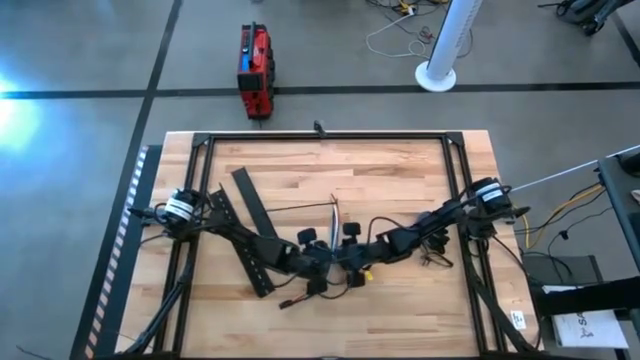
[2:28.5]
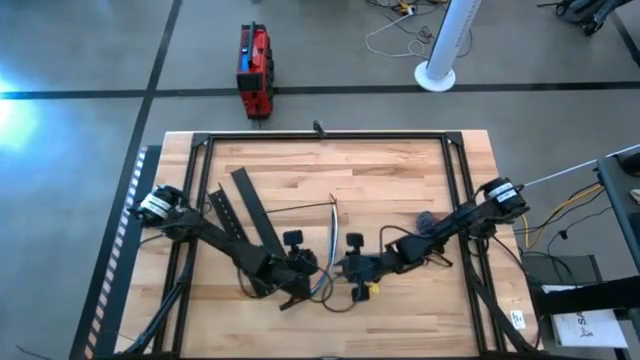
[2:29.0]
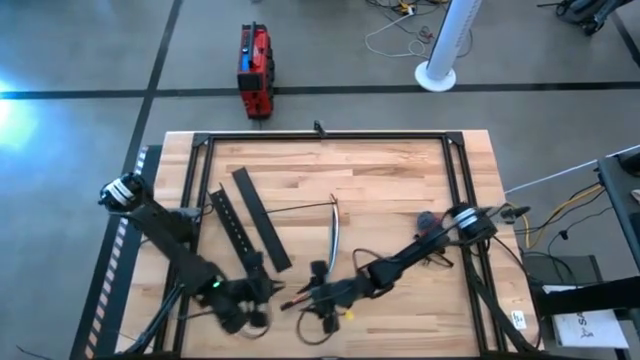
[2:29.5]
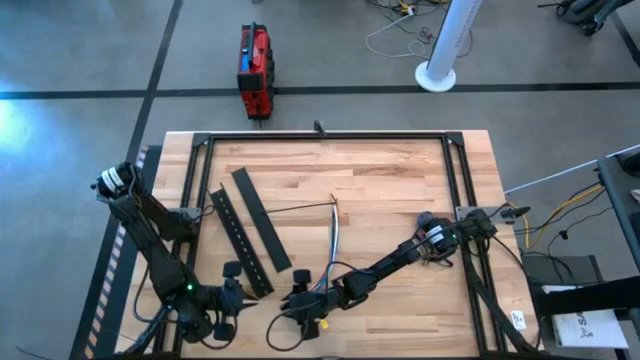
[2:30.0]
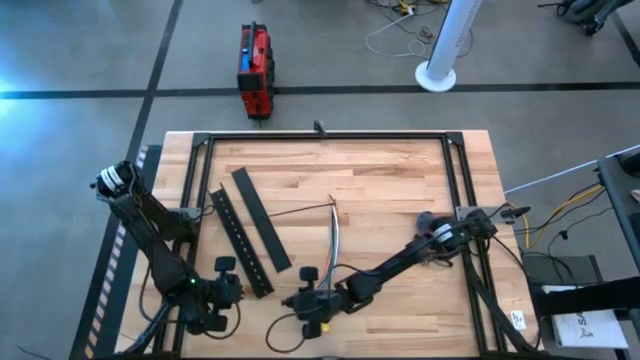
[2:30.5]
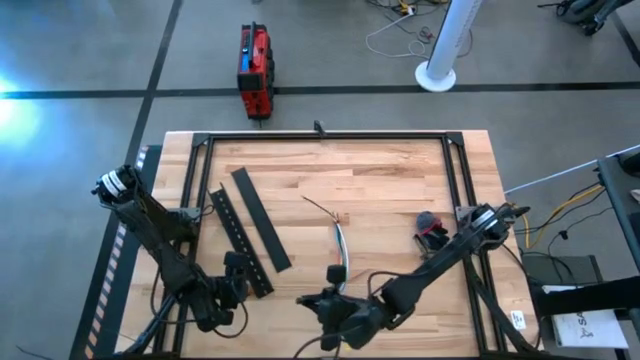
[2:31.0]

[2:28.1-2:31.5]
Task: Ziptie cables
Move the black cable duct to the center of the table

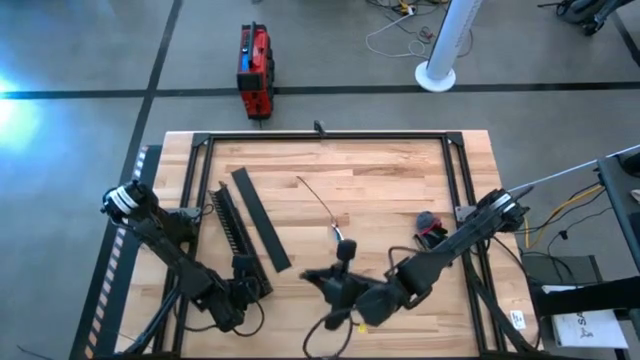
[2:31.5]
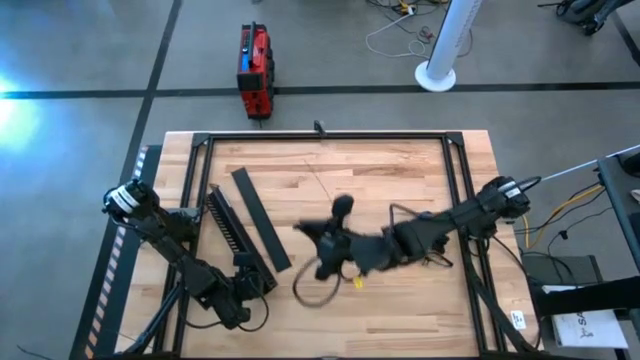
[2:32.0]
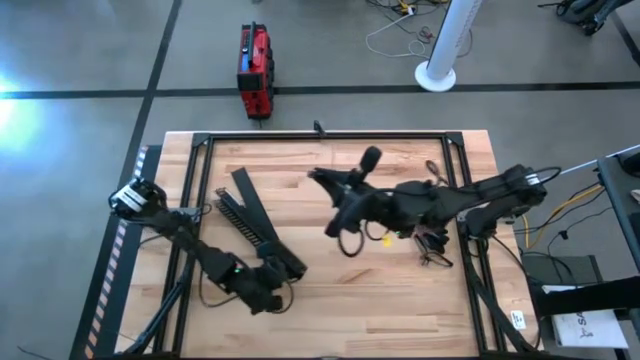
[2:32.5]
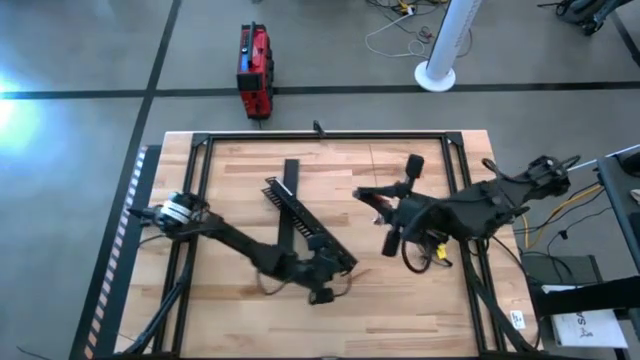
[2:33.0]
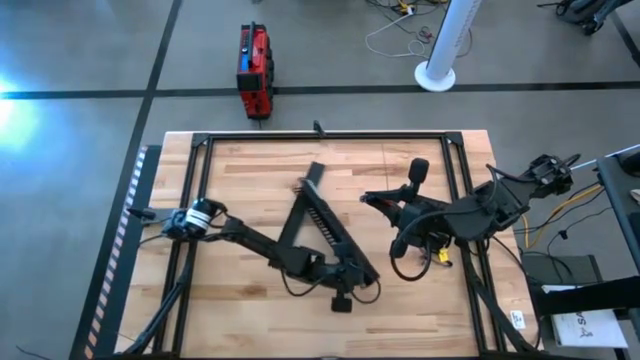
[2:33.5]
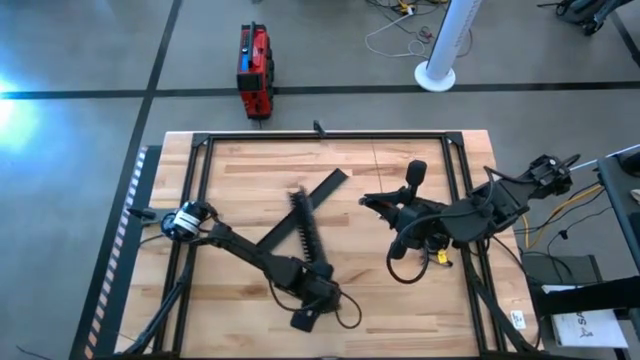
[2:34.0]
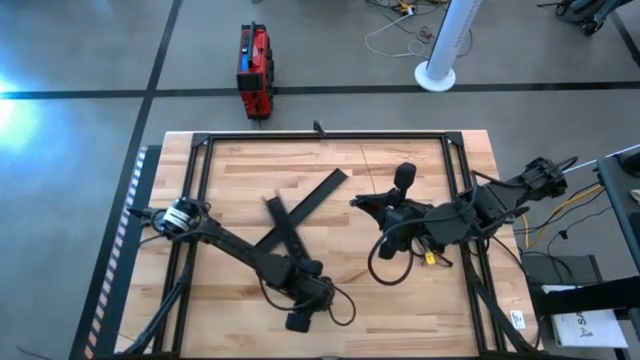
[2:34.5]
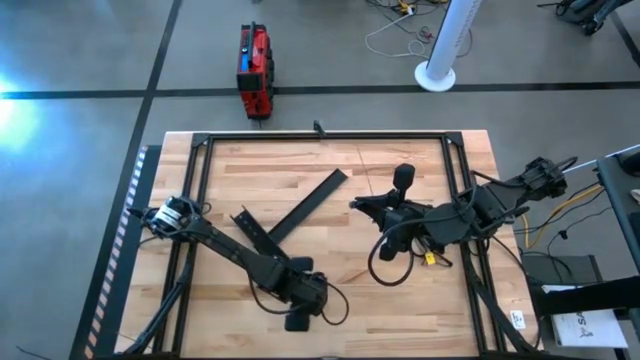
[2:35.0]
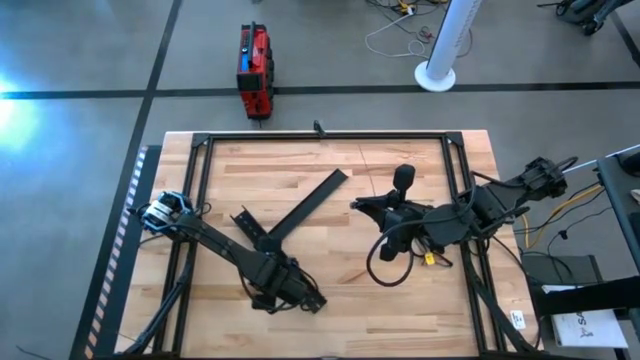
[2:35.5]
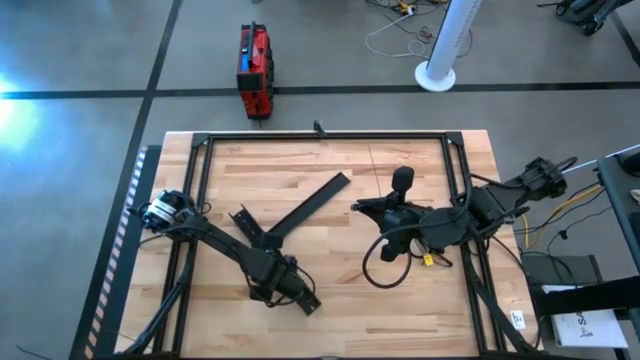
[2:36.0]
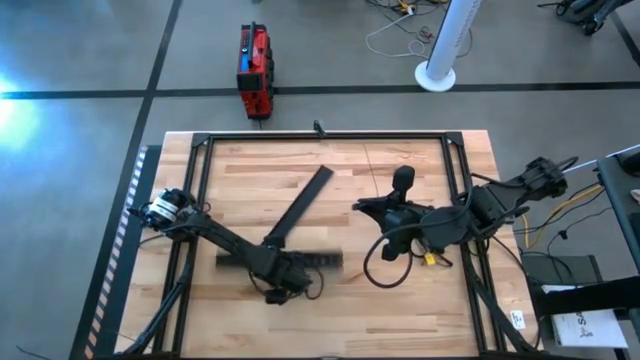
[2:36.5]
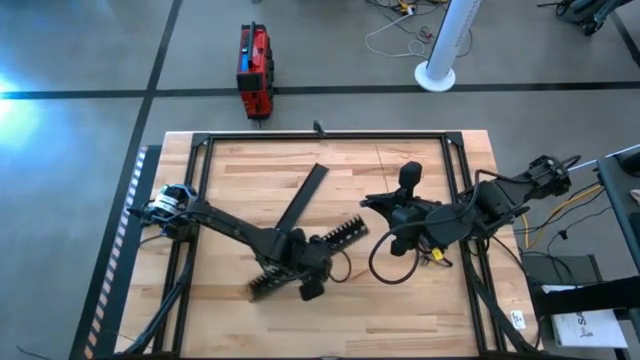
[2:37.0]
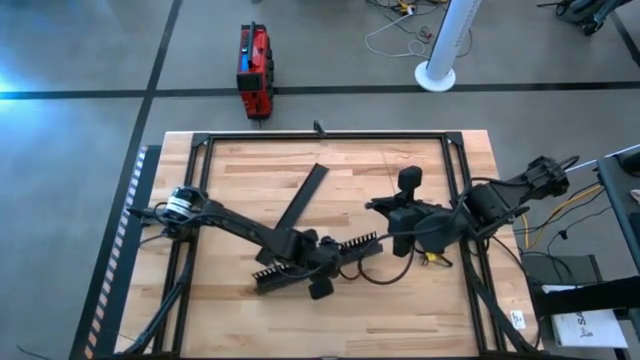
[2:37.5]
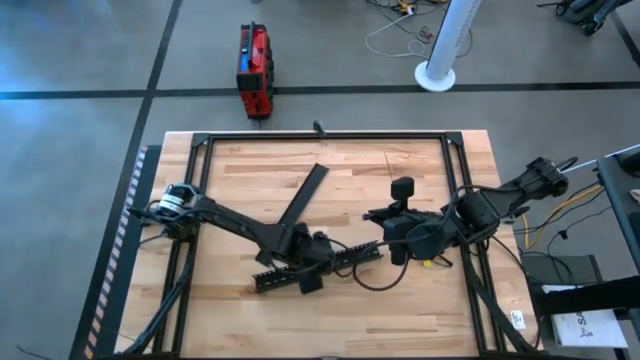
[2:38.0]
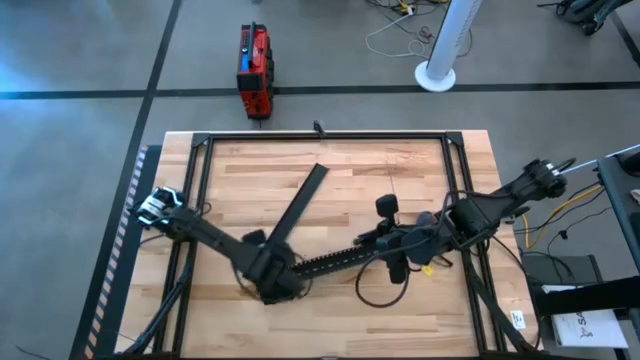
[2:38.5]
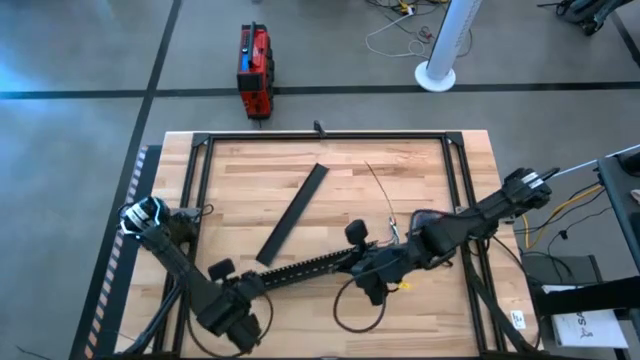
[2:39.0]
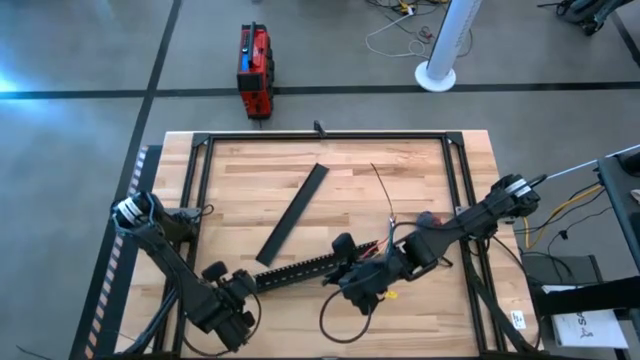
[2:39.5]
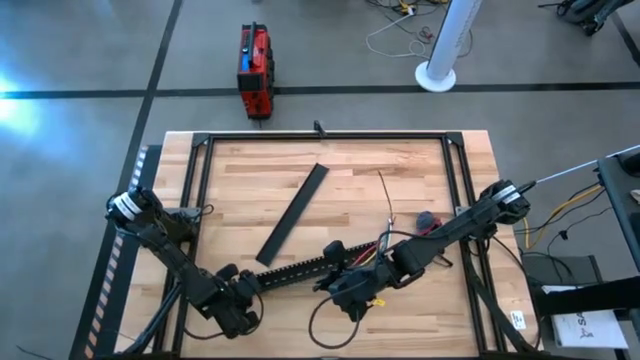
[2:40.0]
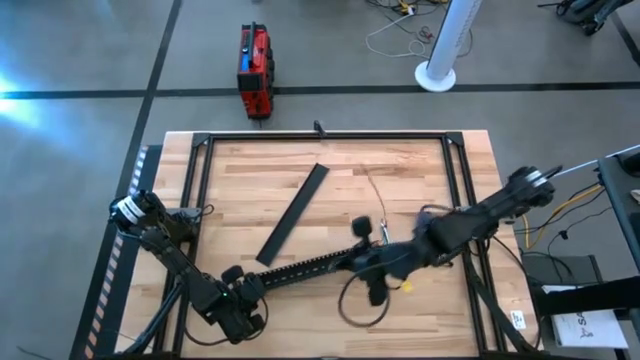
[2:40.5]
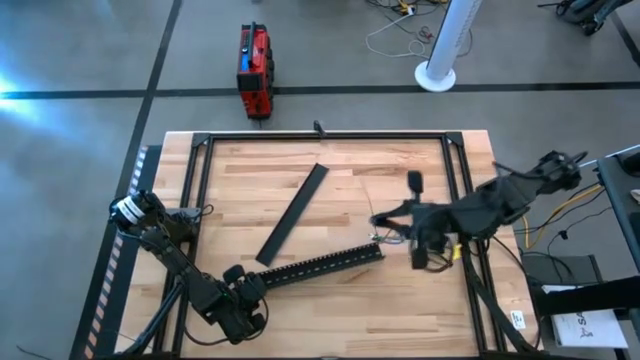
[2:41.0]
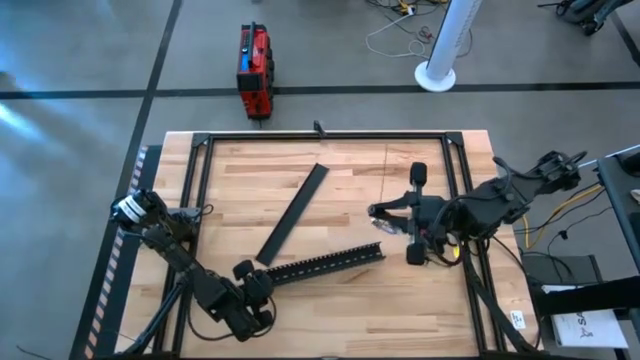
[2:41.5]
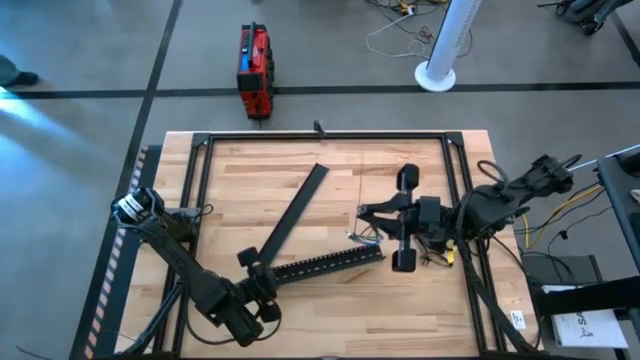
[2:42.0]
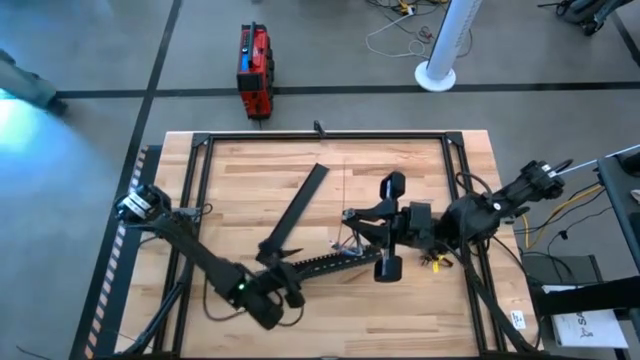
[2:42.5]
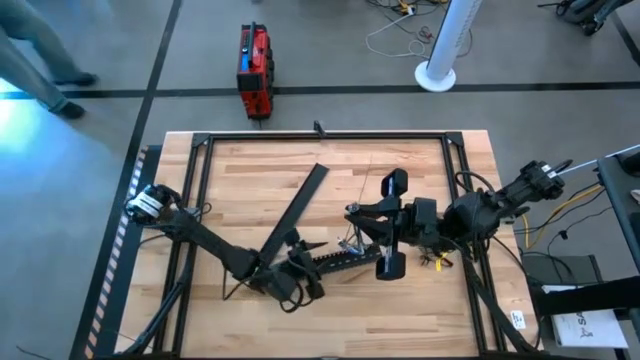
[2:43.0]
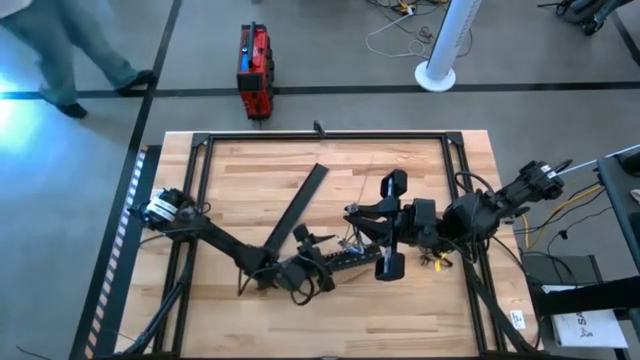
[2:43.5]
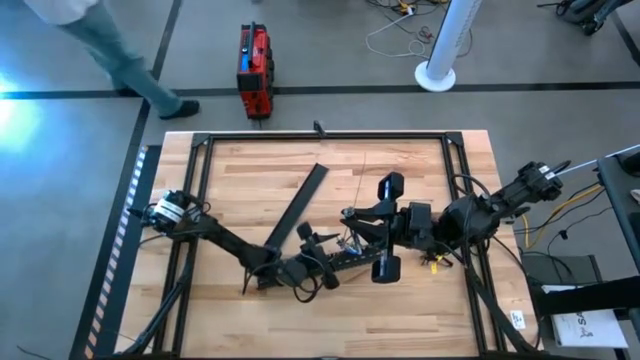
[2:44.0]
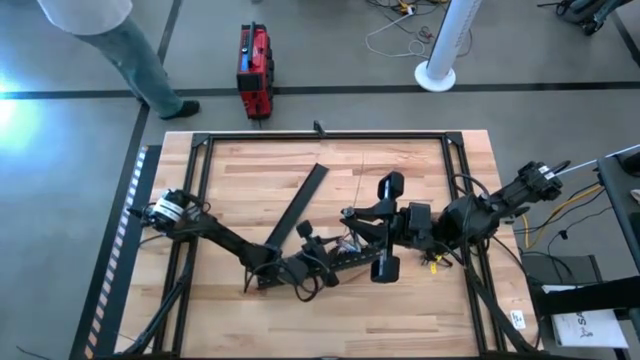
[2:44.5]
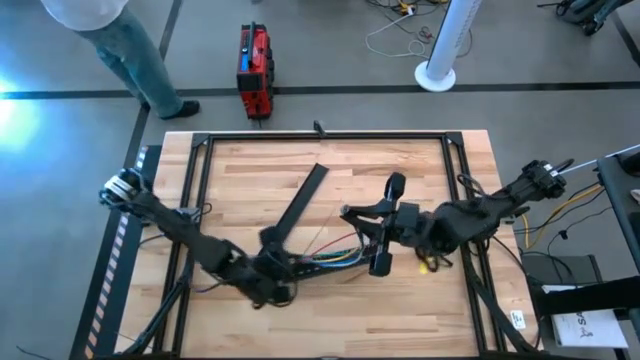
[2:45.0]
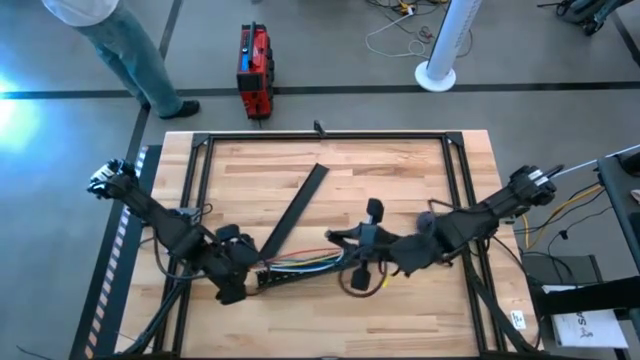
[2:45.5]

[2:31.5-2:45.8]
Put the wrapped cable wires into the cable duct
